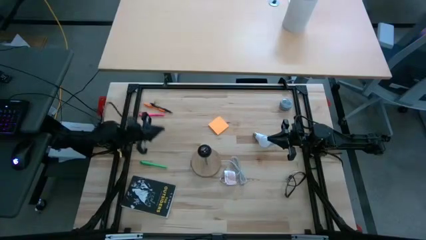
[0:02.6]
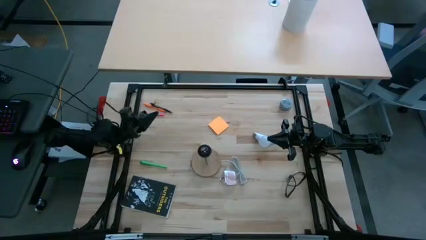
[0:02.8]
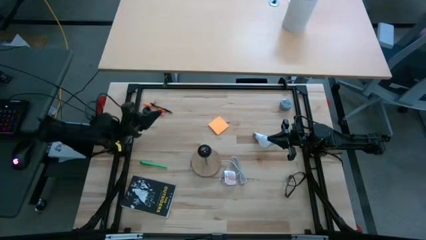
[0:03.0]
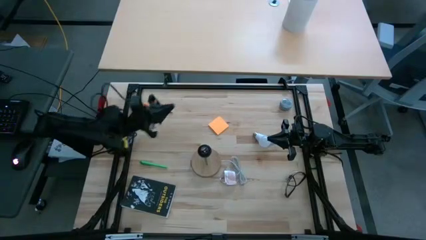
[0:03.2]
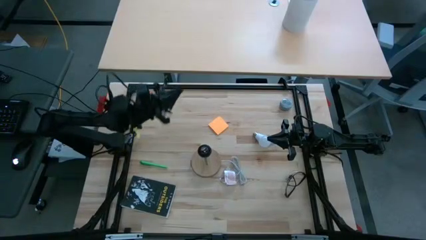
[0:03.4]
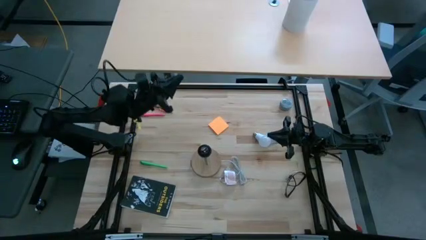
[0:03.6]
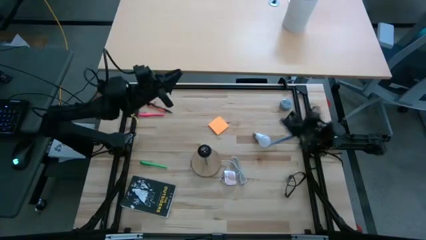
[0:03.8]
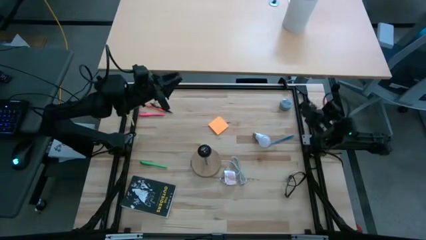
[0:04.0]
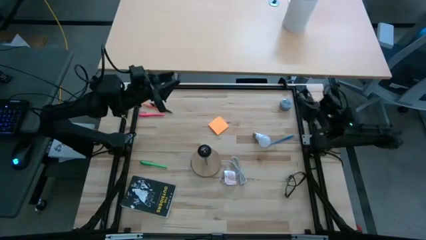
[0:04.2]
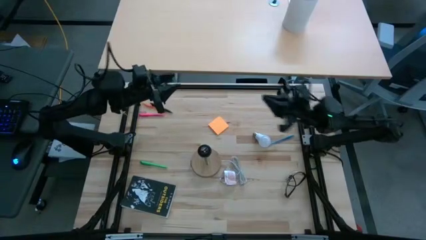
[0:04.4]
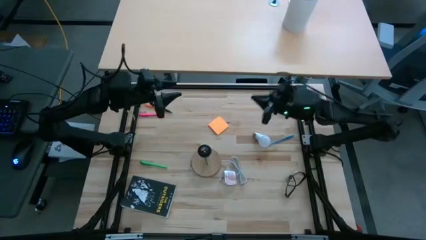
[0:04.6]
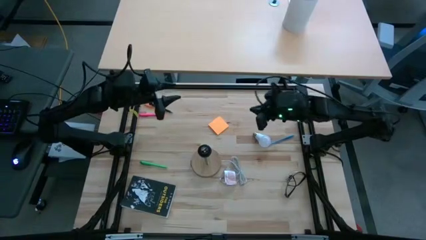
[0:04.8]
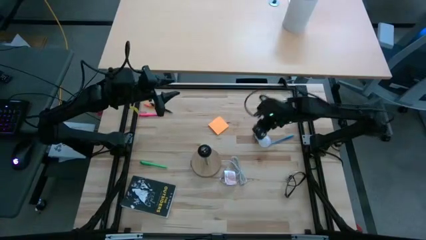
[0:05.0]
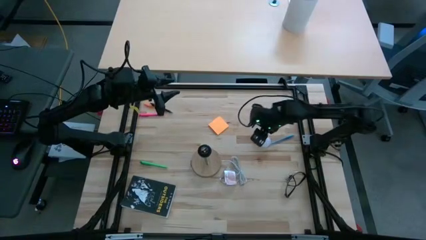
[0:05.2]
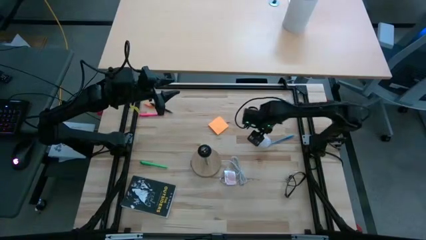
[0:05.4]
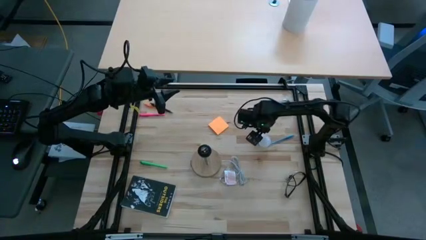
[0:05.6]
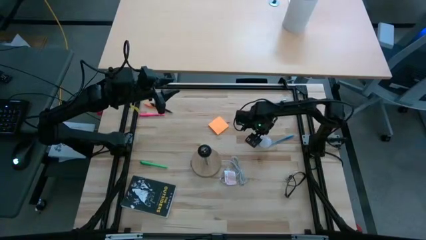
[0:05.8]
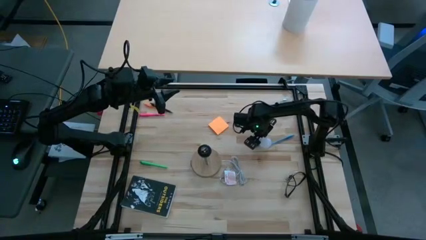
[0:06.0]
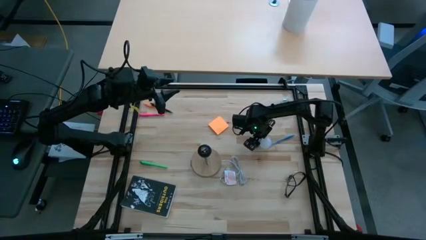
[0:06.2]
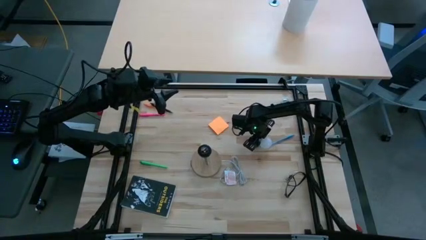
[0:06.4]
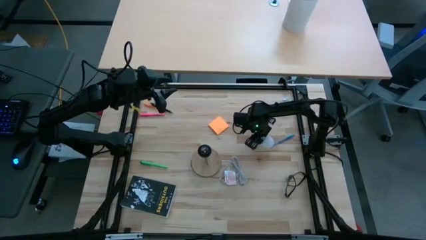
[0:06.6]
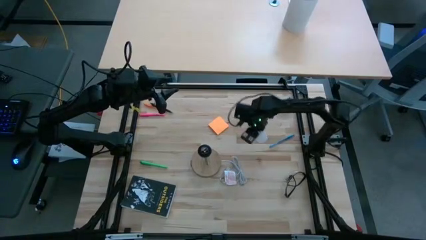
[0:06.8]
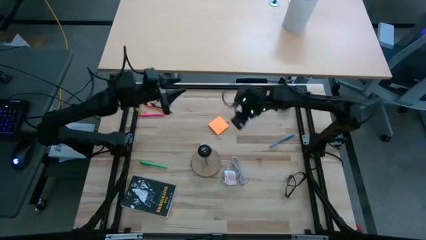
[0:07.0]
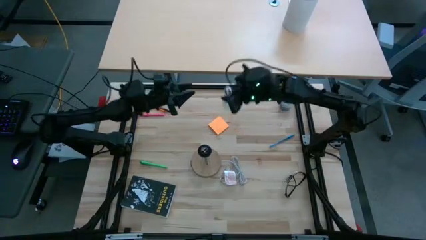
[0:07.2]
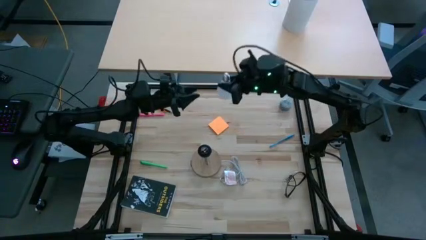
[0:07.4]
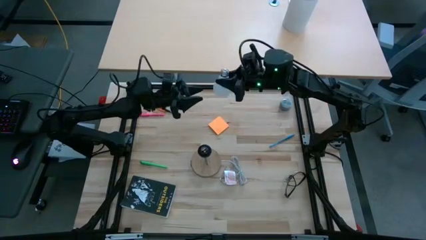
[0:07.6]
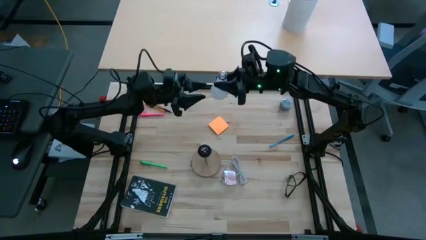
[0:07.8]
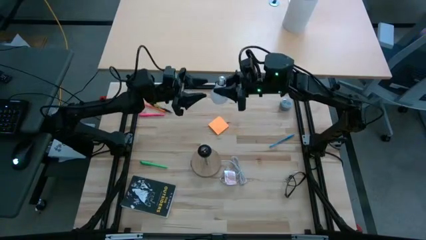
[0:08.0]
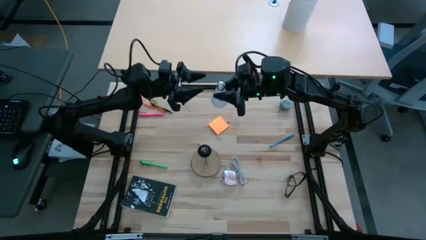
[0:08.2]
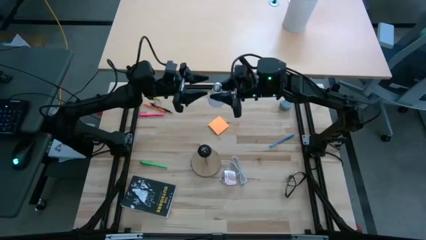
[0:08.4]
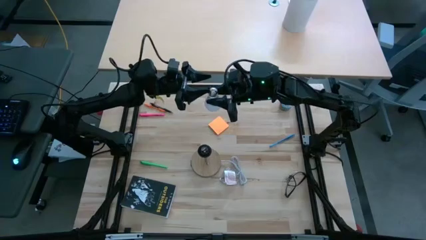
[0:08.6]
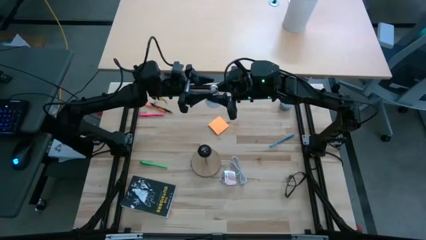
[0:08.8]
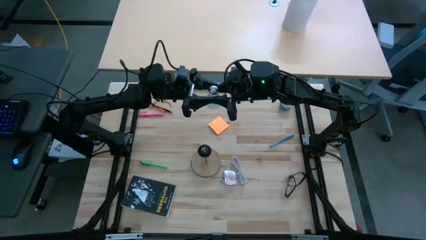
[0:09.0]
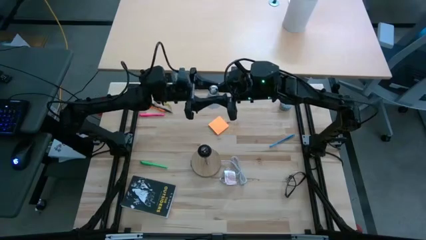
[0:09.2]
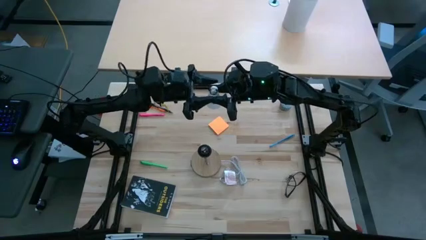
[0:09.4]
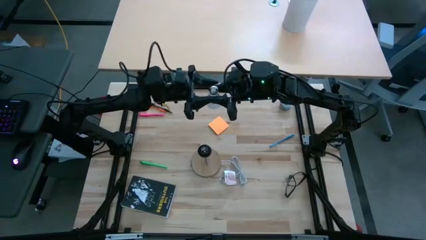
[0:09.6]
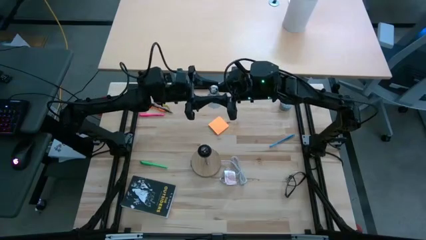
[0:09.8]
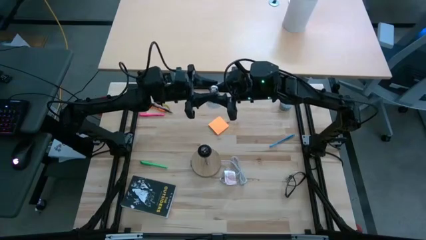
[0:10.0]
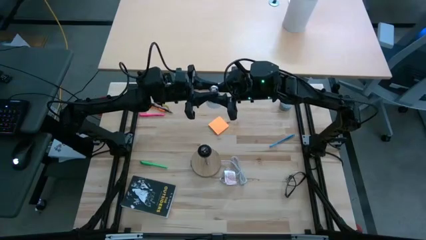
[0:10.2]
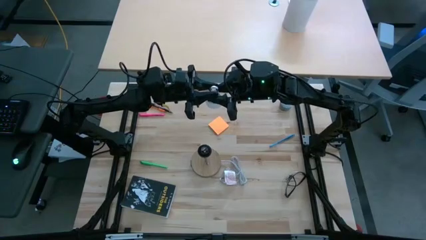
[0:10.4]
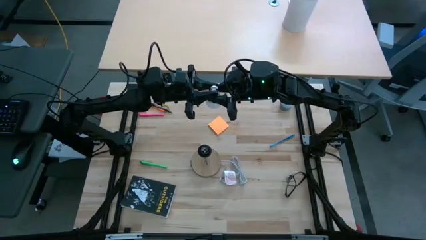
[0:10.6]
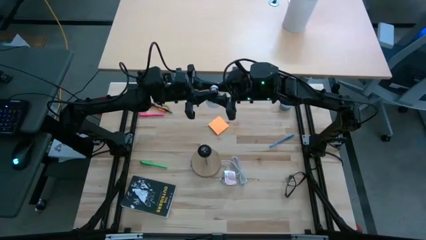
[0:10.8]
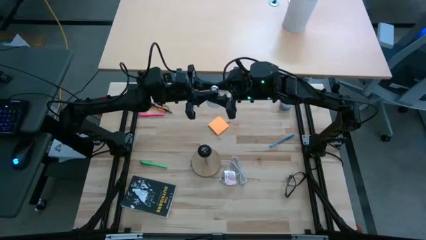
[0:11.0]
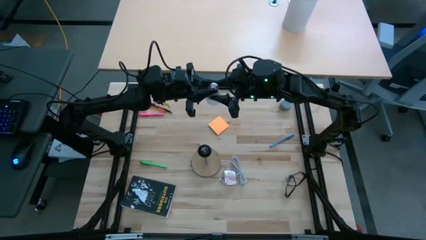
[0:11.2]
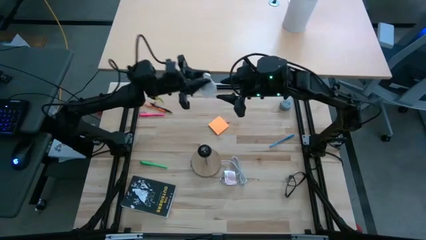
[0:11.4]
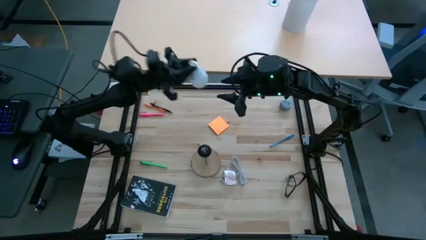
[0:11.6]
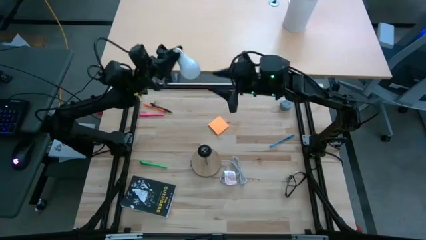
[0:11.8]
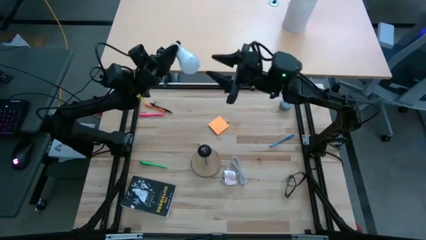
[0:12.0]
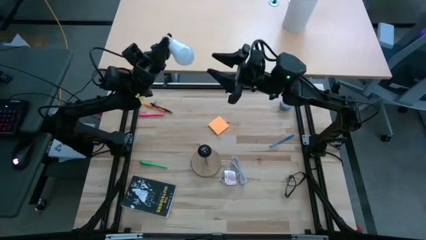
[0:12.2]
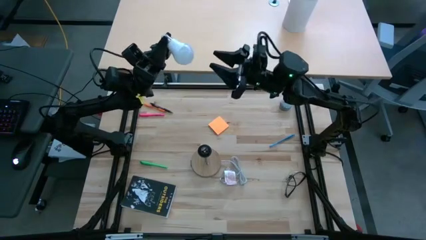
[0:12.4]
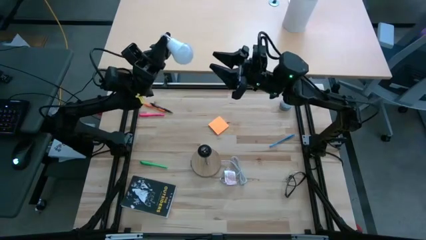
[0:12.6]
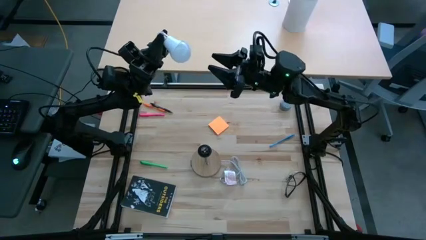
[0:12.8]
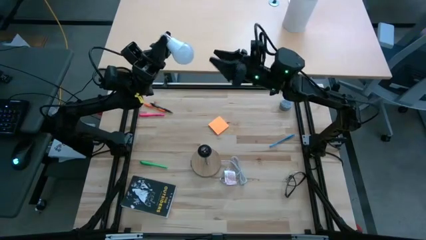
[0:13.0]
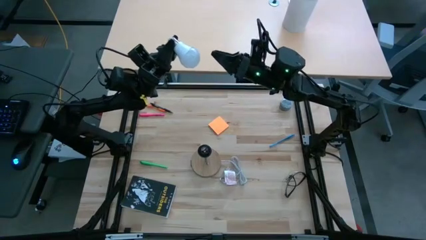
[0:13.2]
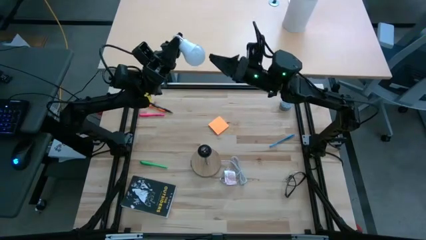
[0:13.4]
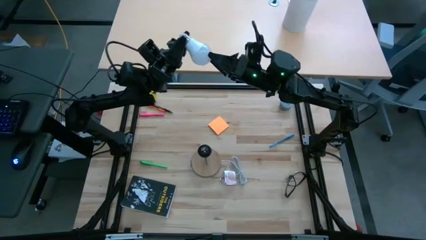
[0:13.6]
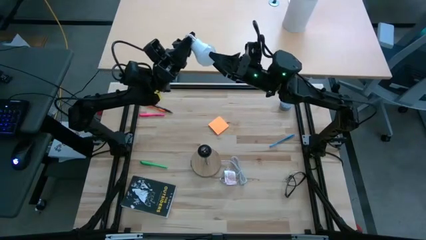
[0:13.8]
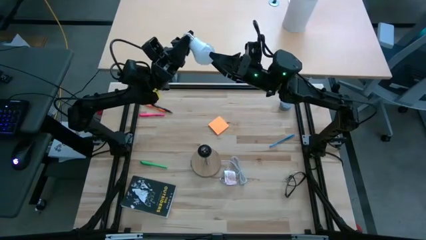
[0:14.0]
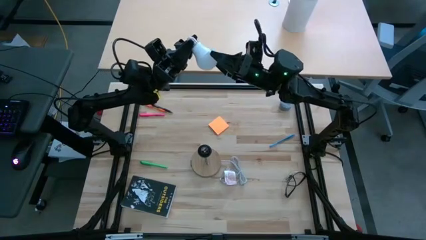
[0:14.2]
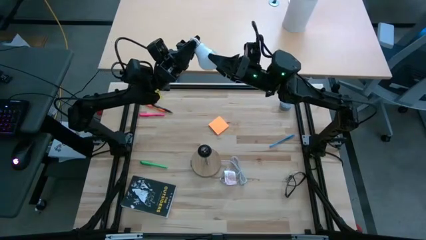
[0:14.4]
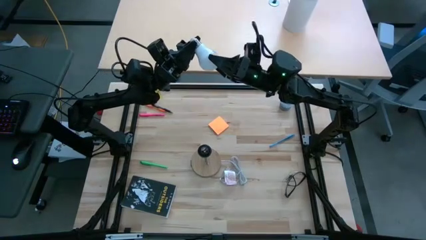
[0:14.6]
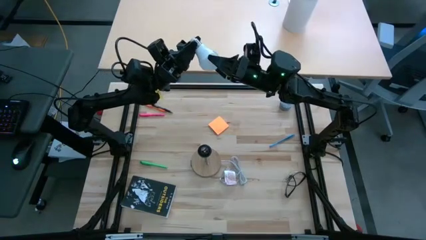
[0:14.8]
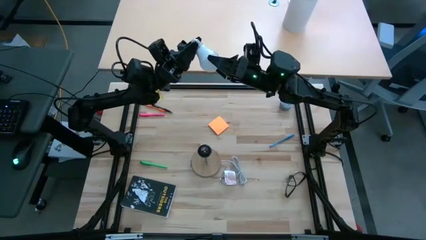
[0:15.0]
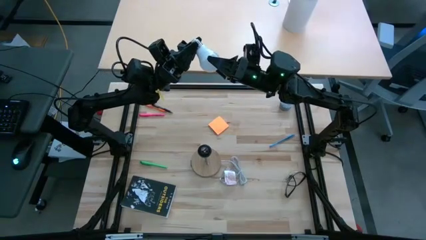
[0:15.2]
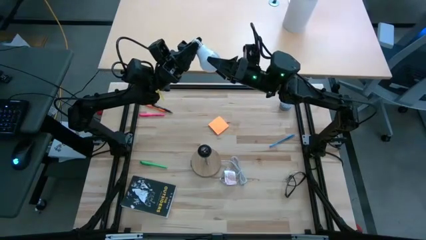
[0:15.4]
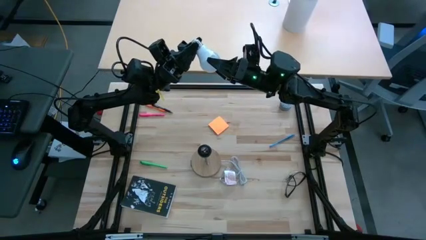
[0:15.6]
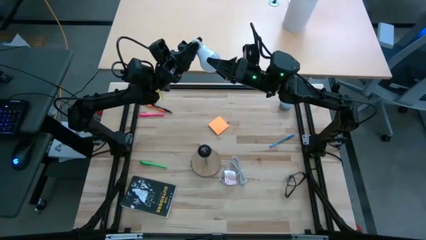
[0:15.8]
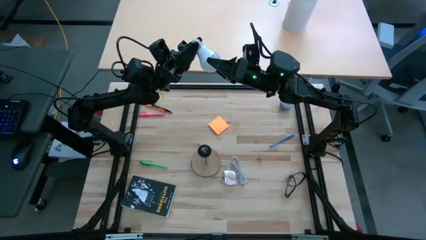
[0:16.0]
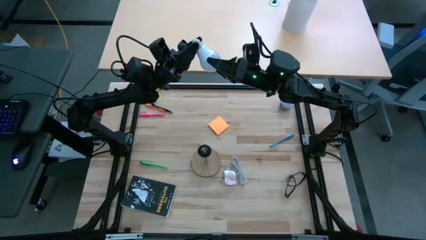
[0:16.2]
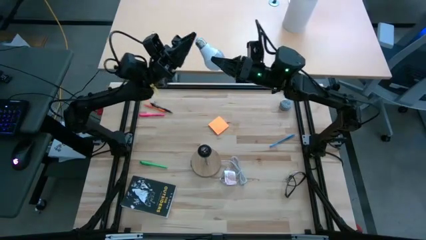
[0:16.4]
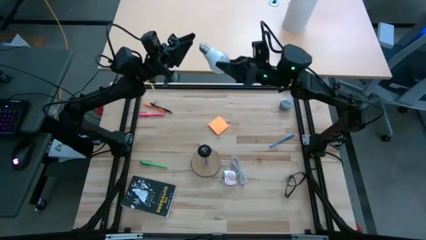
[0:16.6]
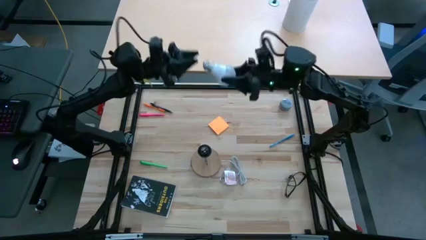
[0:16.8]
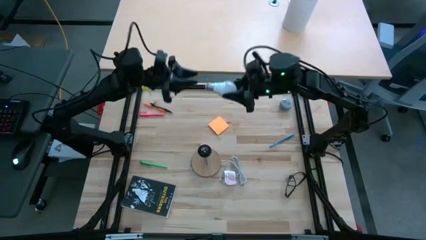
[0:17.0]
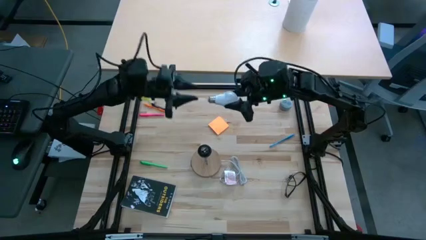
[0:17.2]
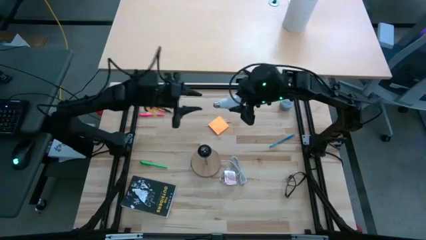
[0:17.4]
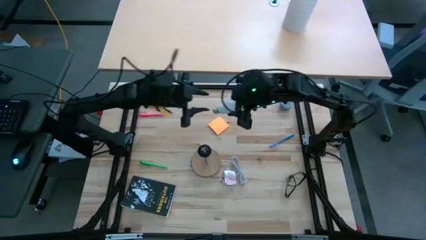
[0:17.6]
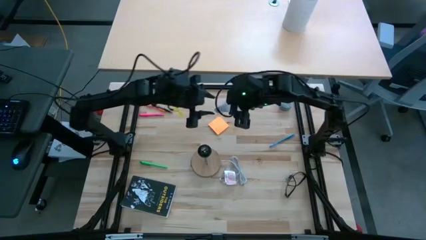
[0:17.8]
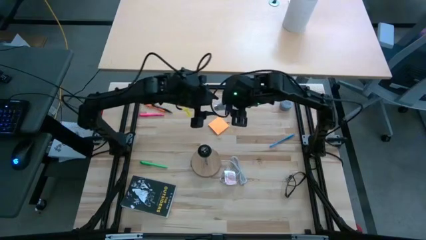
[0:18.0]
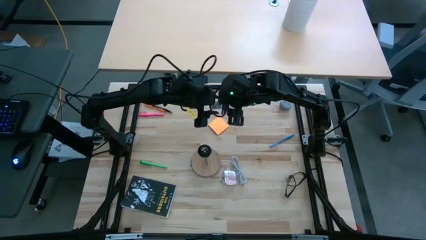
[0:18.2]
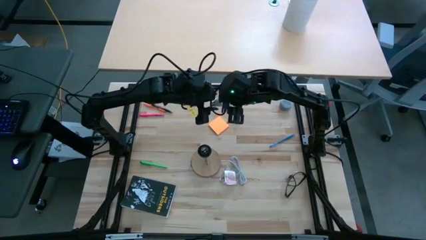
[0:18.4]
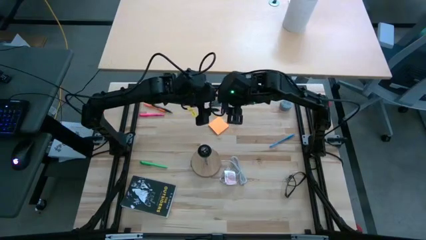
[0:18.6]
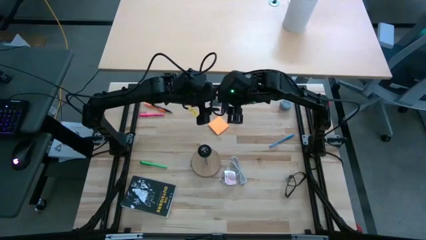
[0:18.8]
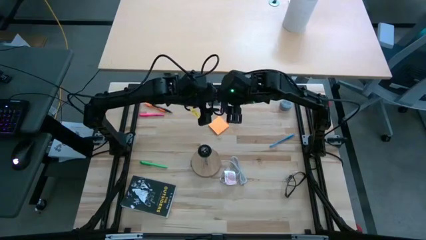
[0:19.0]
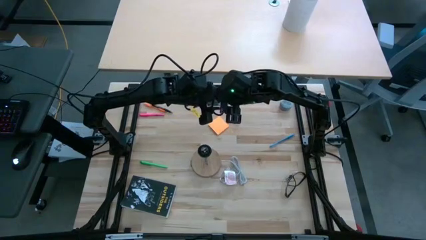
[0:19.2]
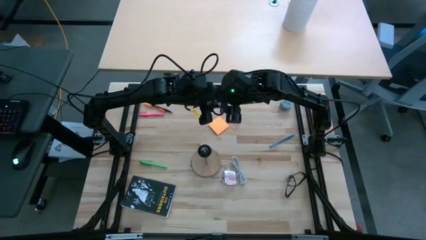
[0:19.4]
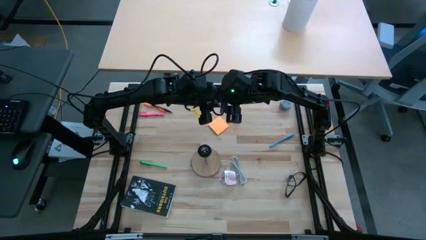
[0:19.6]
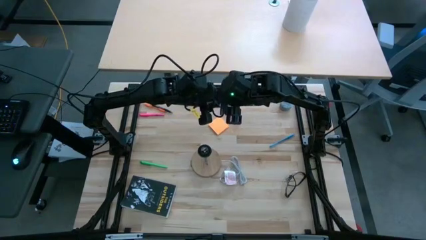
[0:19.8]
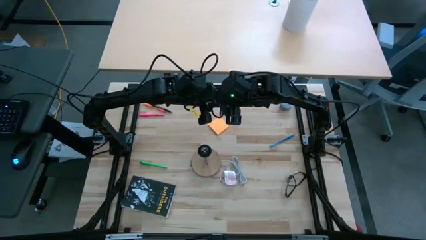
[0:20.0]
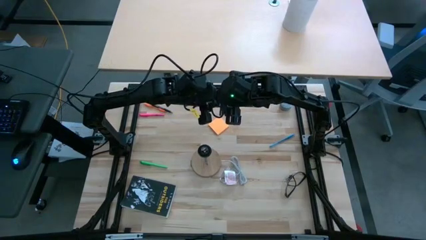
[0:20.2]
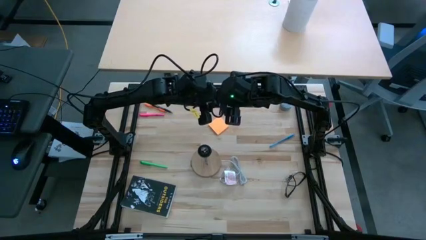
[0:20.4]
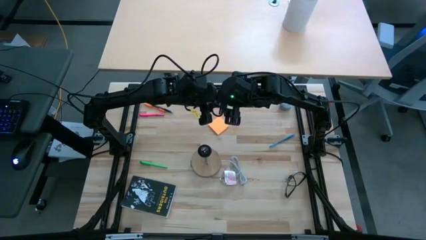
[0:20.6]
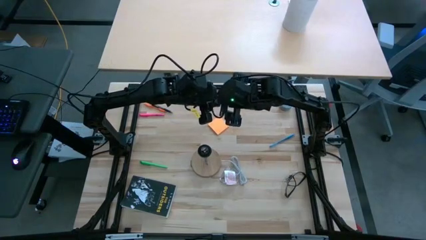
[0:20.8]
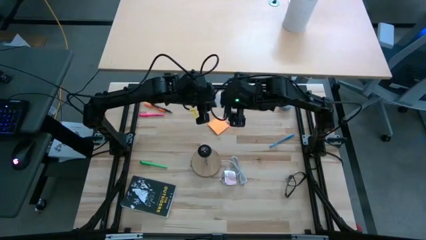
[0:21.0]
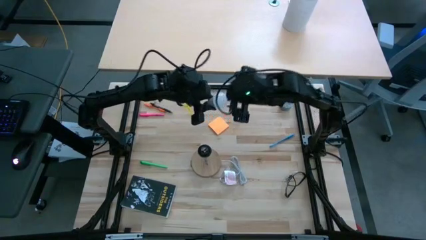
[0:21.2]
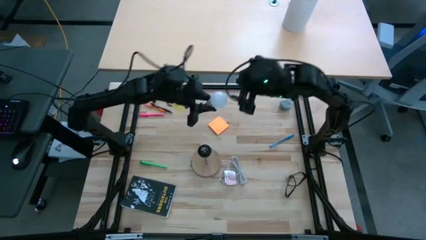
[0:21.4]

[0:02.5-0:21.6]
Task: Screw lightbulb
Insert the white lightbulb into the lamp
